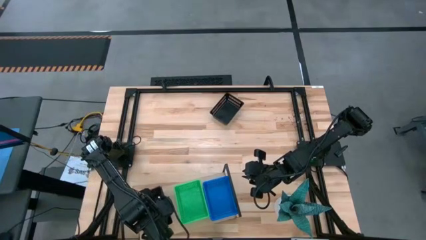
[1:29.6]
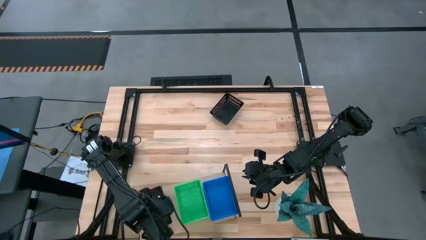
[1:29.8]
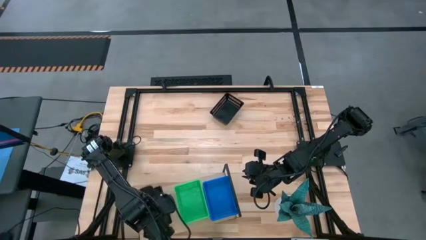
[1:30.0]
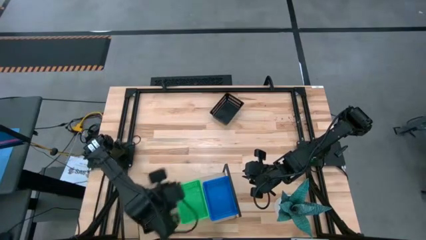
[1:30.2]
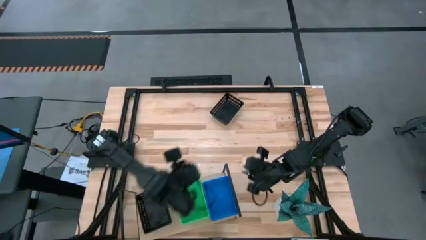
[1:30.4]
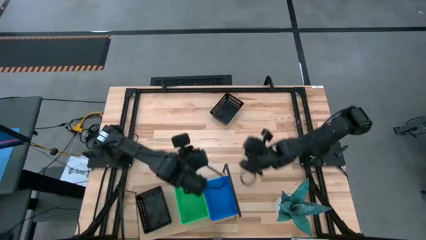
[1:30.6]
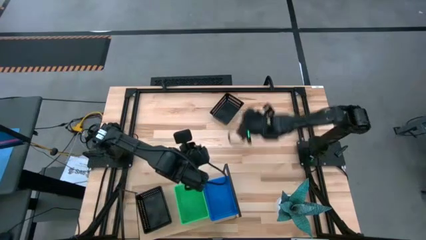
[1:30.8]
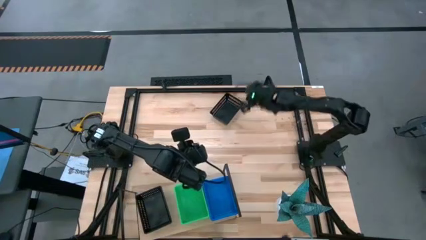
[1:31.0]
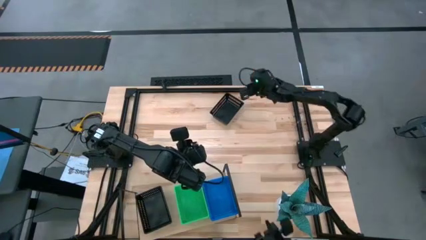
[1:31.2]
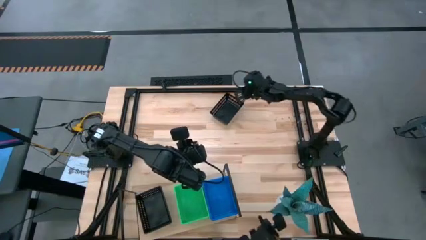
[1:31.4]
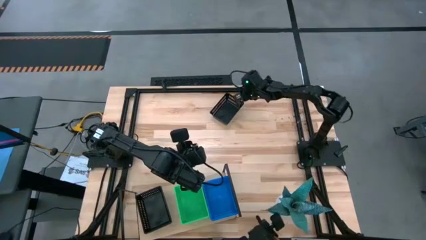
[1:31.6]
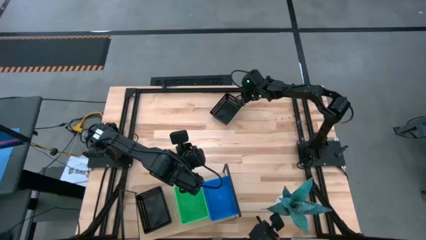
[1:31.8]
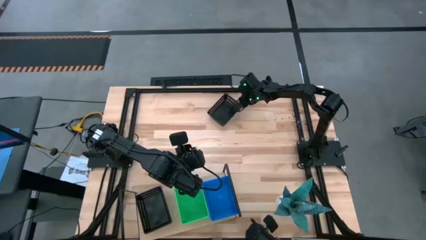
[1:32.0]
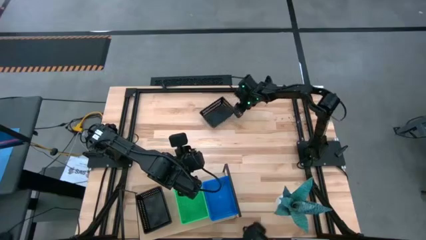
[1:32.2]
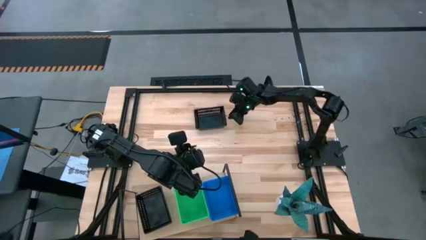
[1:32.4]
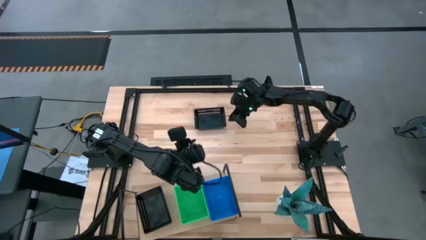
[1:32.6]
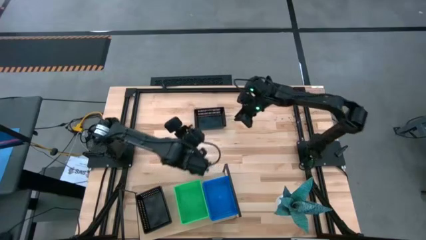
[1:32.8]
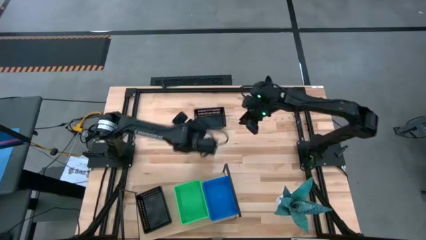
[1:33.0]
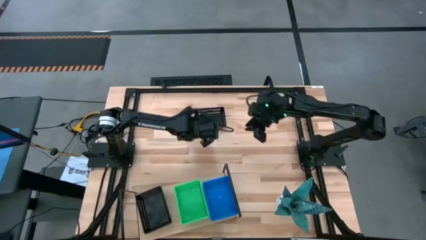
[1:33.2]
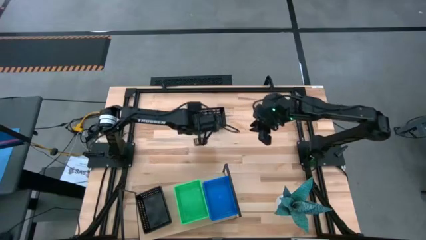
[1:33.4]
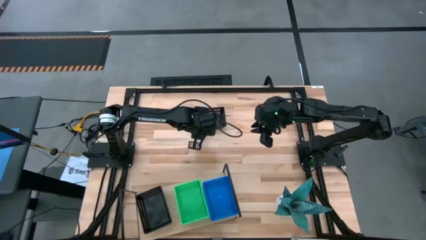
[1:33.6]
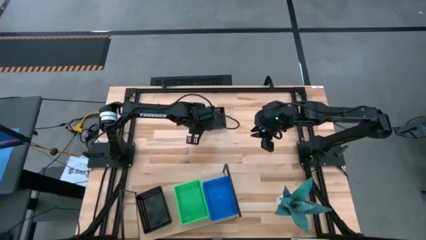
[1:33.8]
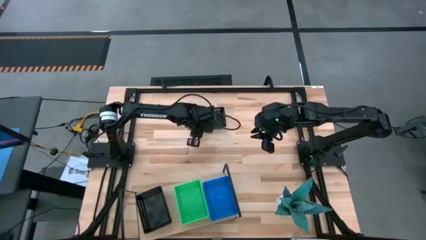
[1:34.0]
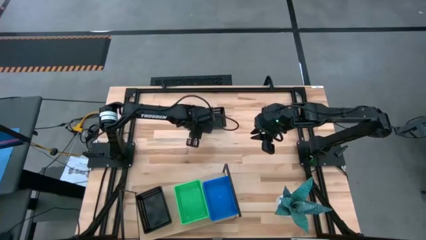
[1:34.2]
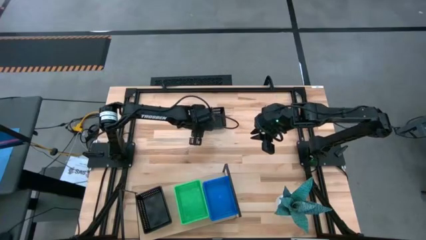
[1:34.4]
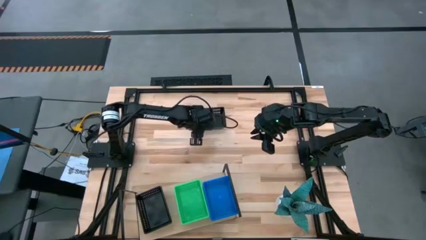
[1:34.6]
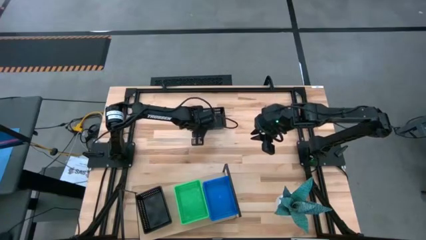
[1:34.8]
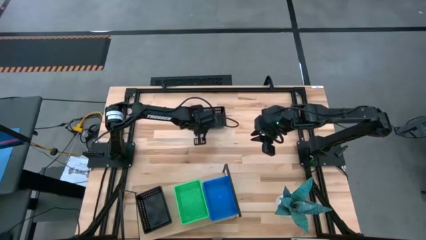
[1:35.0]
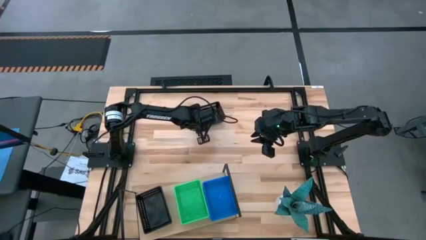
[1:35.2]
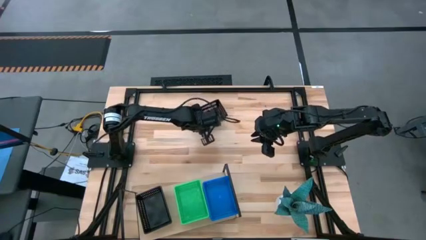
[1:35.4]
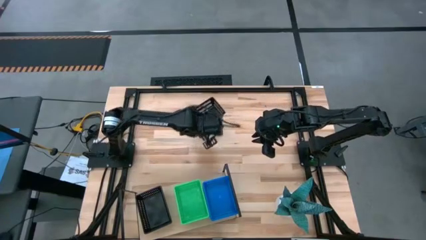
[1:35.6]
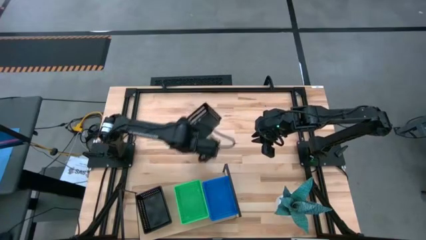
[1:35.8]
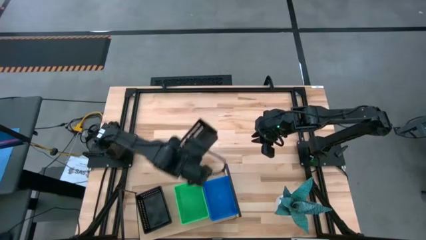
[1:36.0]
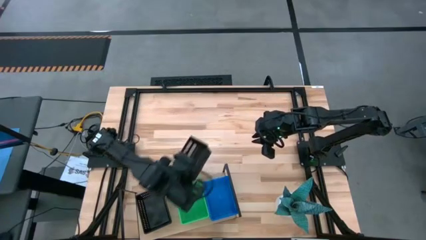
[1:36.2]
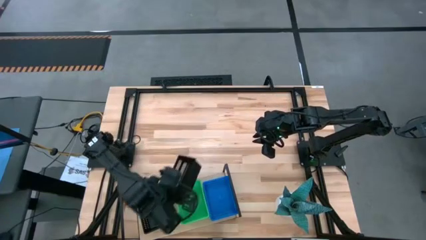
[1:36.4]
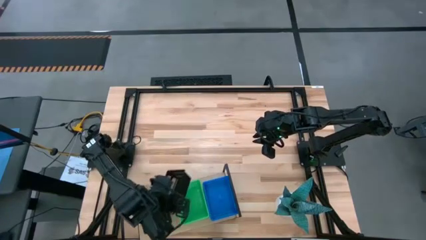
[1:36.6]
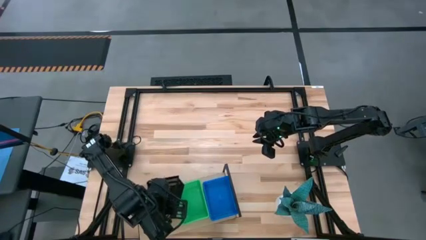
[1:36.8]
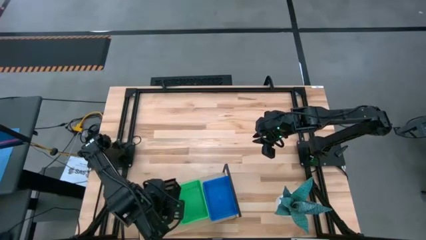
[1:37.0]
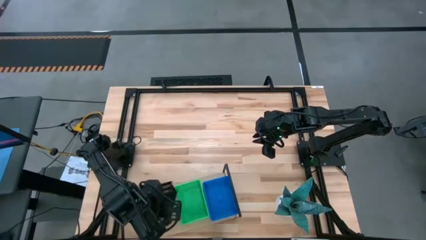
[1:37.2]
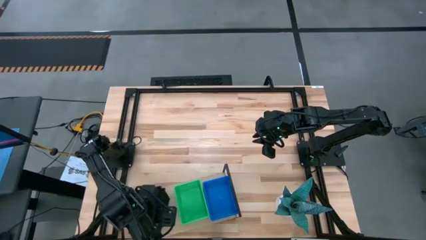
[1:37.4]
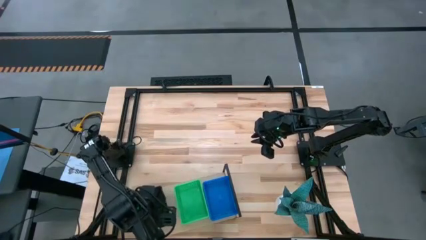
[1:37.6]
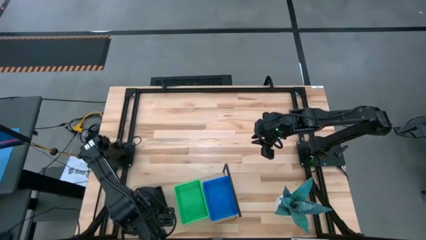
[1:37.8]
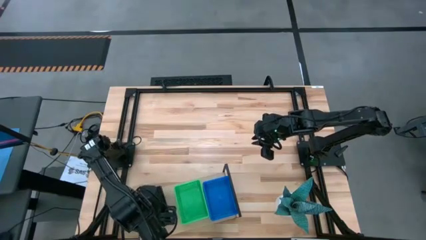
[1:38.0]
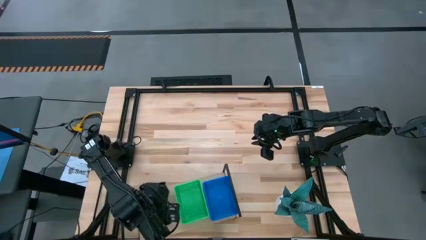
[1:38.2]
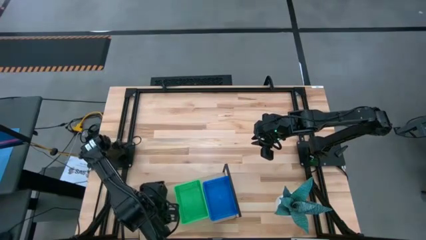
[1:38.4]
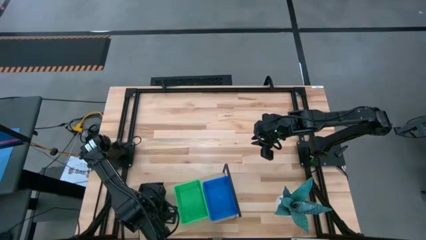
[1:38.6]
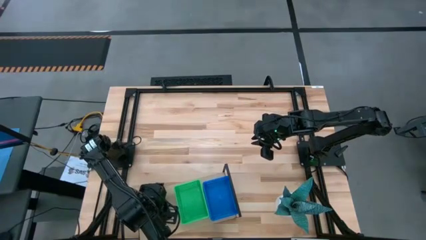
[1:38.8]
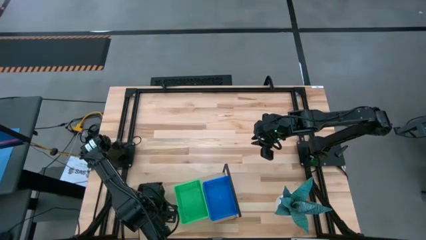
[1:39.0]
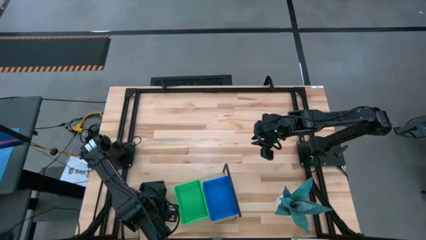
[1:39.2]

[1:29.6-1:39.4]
Task: Stack baskets on shelf by color
Stack the black basket on the top of the stacked black basket

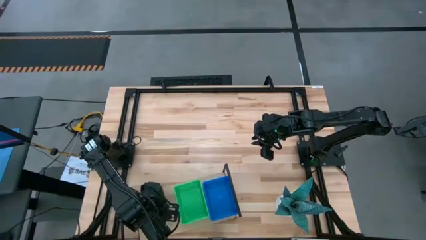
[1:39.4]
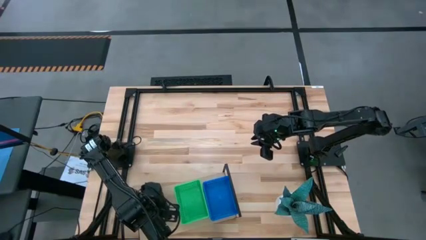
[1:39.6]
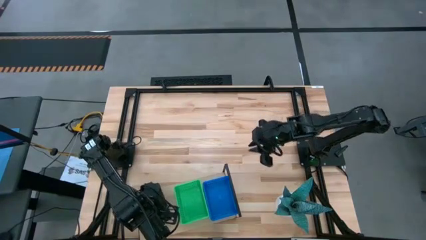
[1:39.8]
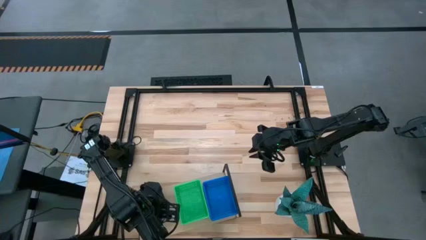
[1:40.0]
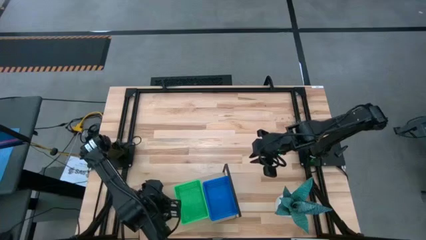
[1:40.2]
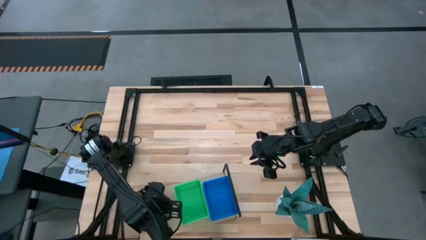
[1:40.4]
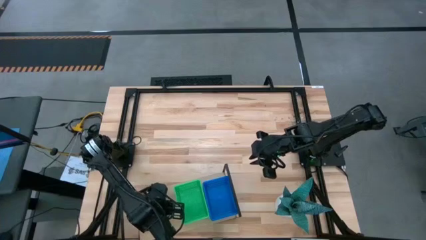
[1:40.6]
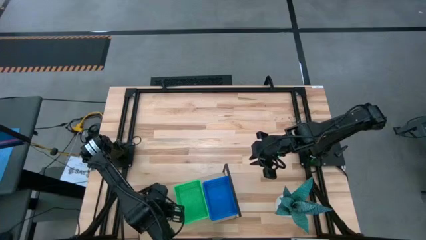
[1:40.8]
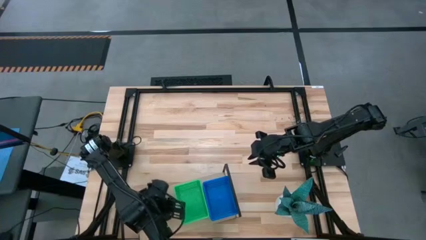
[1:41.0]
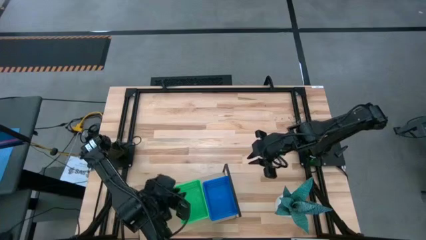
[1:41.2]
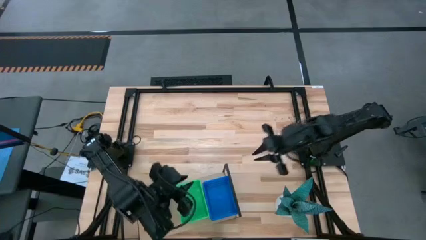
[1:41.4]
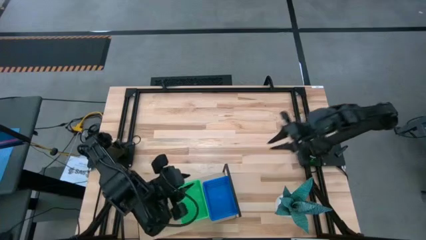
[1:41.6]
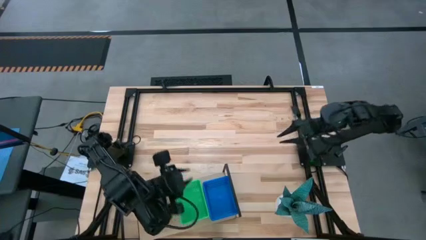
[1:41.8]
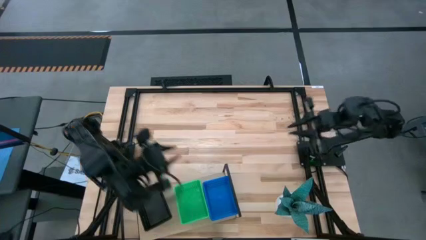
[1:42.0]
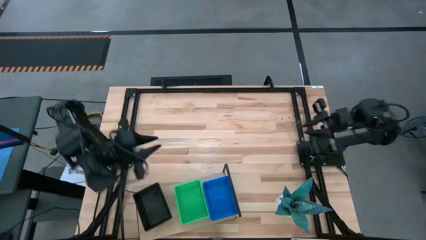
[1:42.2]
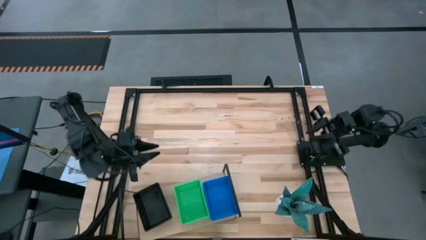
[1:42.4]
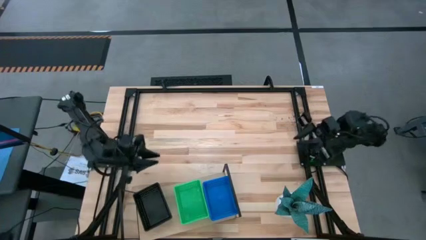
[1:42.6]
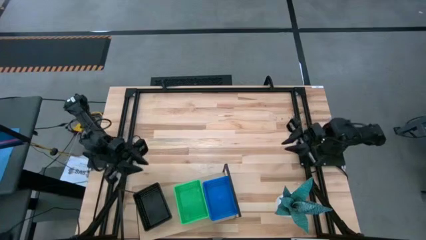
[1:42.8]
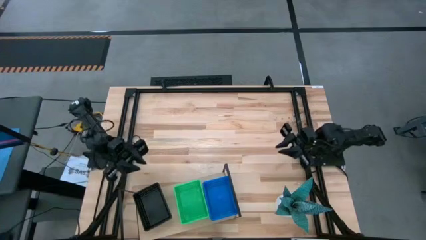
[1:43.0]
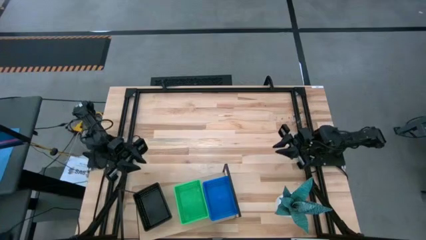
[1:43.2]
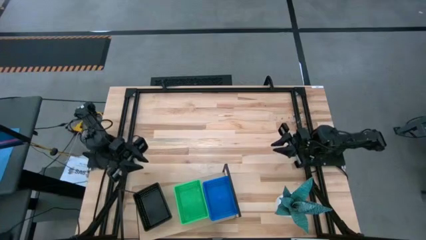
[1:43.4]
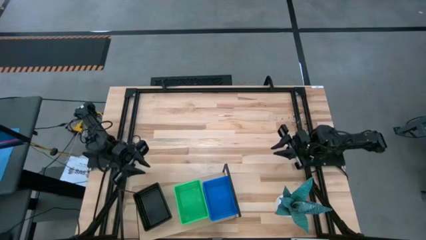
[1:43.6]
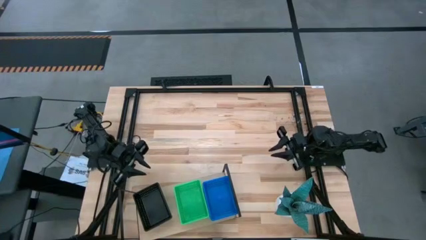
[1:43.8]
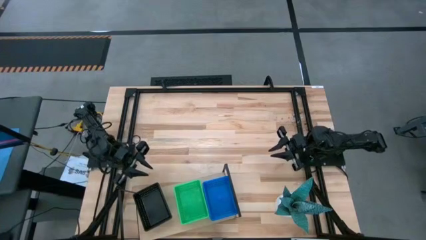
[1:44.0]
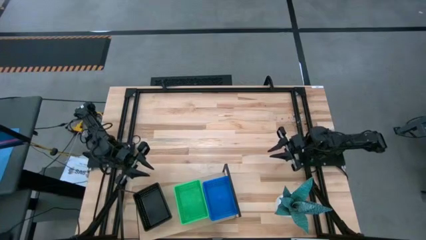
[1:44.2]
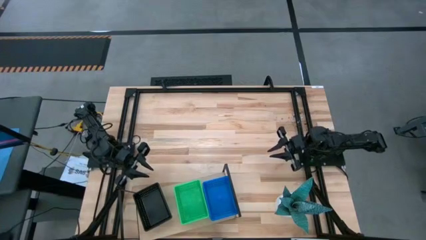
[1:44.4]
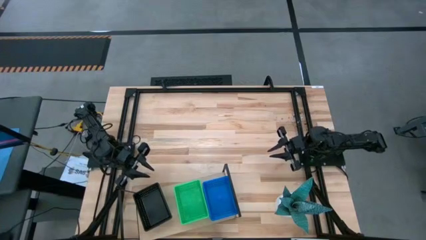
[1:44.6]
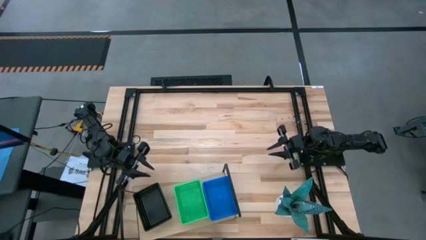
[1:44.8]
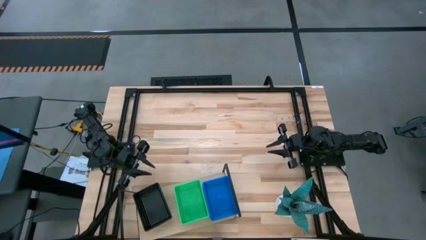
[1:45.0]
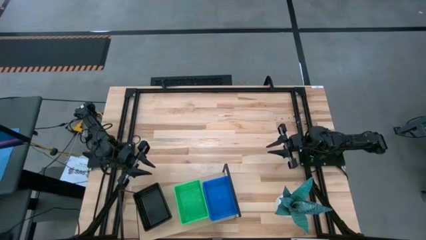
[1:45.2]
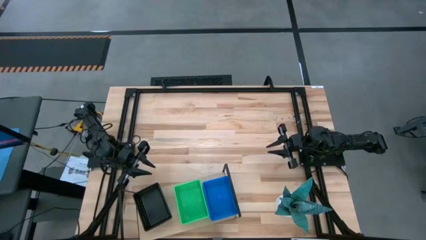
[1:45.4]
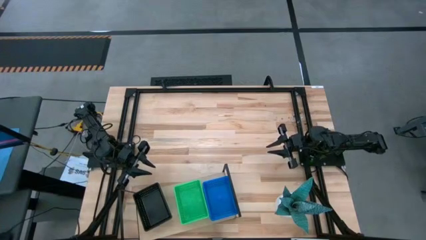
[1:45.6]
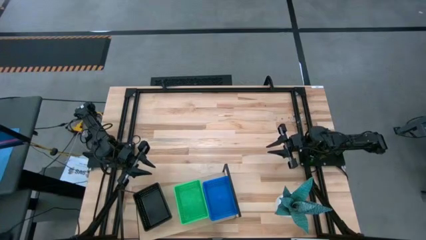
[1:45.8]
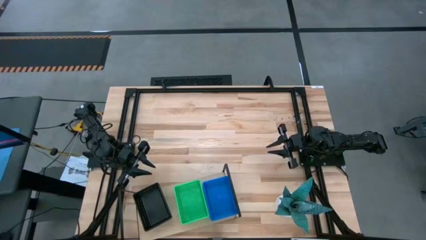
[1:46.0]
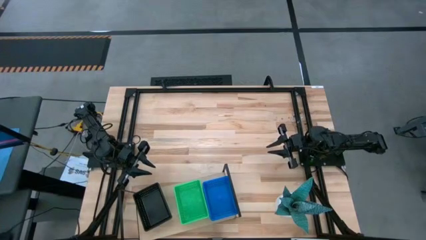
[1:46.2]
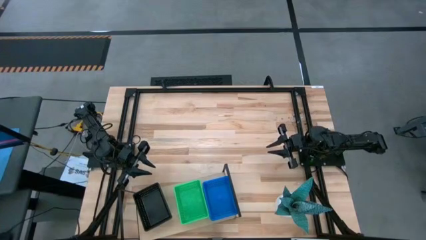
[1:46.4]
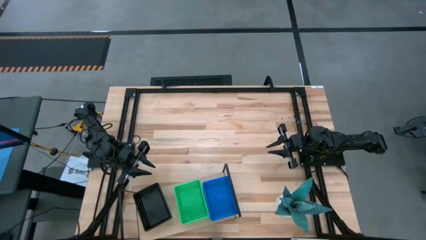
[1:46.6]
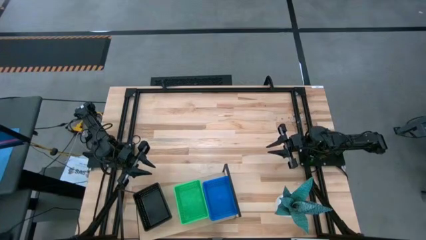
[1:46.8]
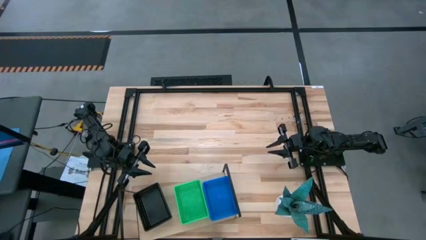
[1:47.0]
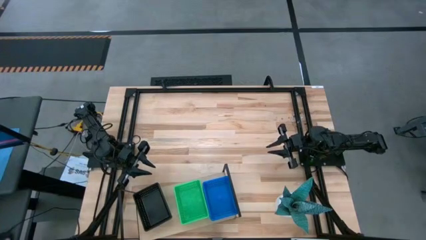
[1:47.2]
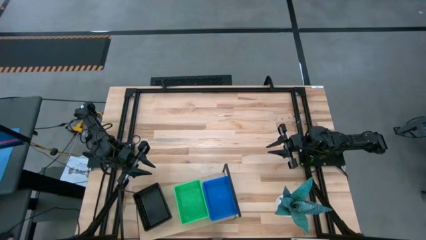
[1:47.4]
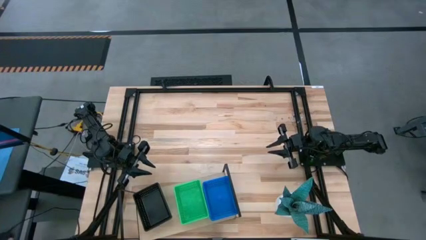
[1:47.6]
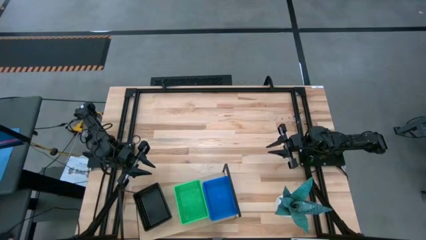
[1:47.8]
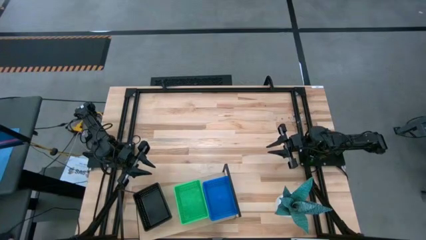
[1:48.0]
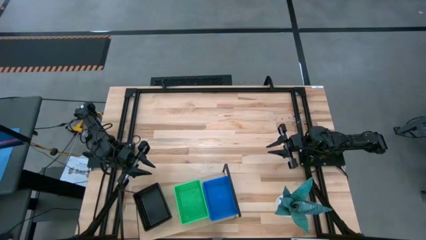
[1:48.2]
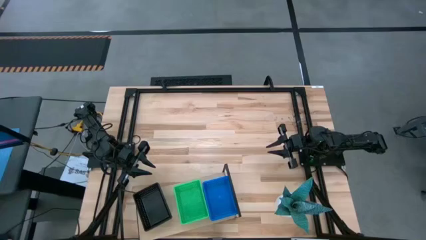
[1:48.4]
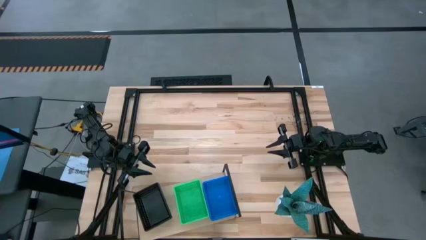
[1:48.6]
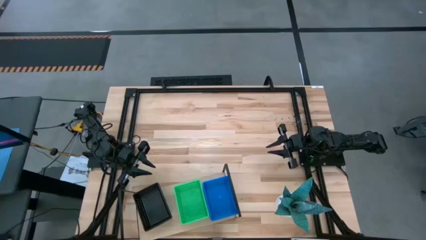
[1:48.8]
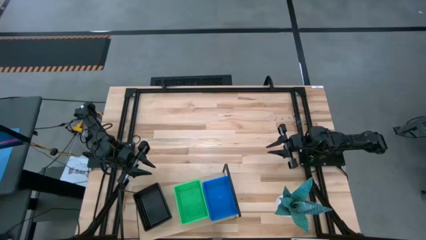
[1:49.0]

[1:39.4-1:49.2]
Return to Home Position
